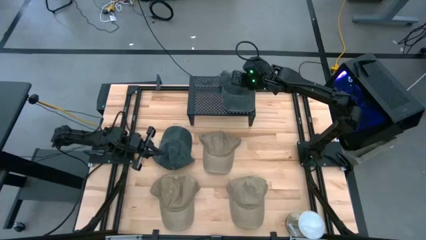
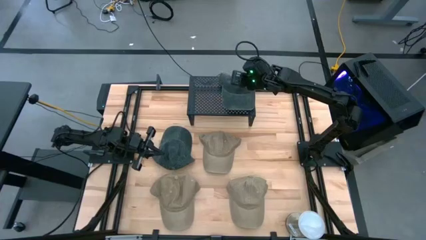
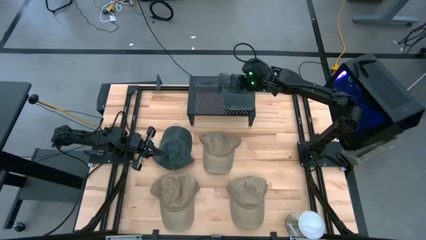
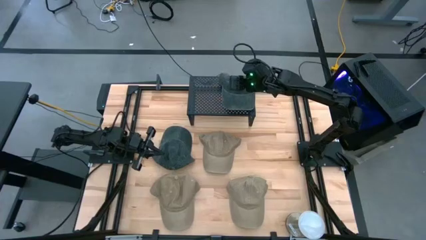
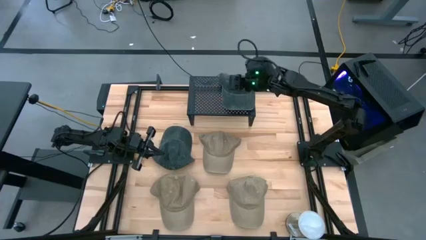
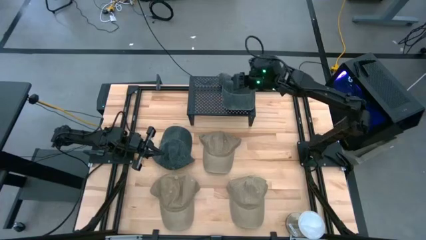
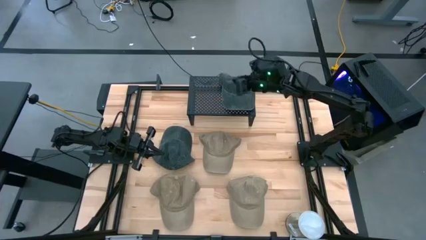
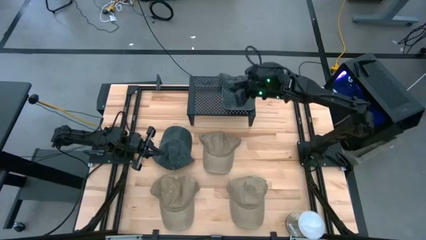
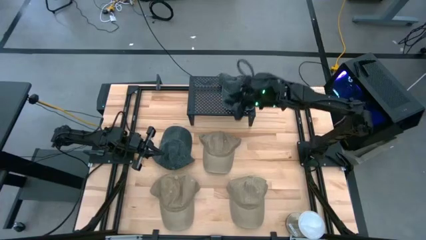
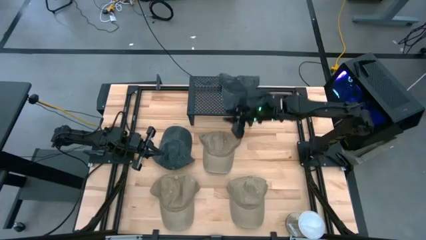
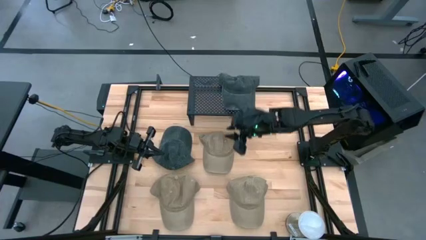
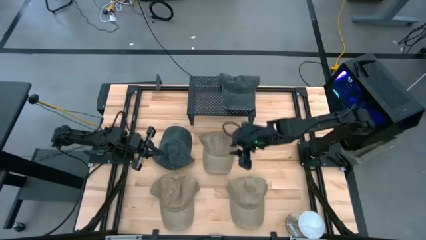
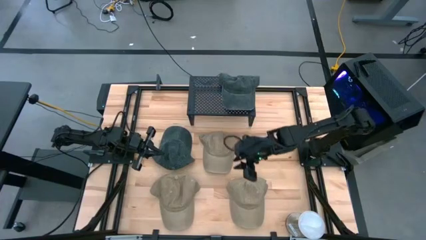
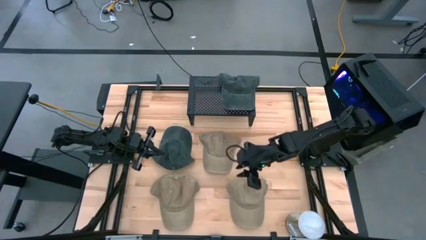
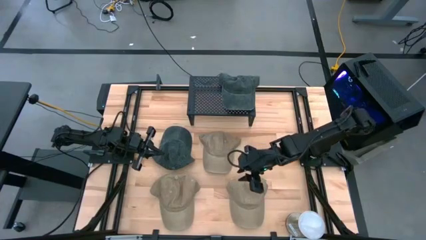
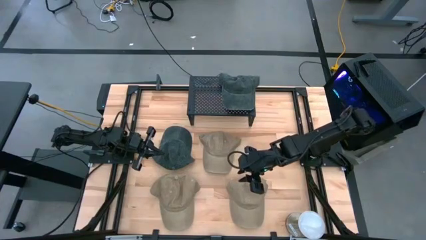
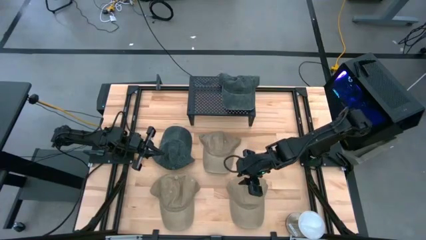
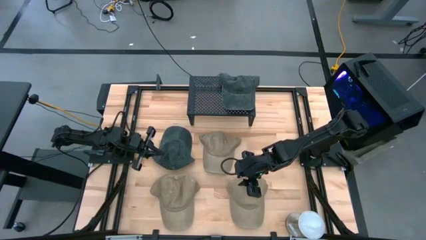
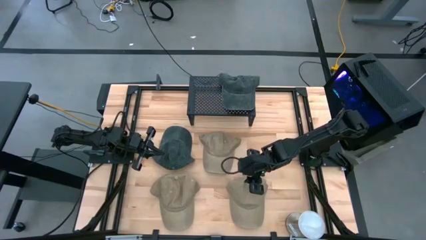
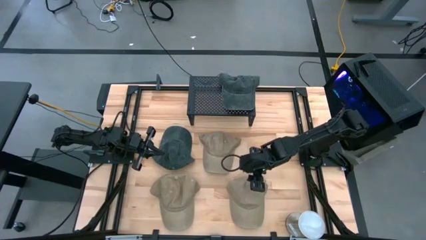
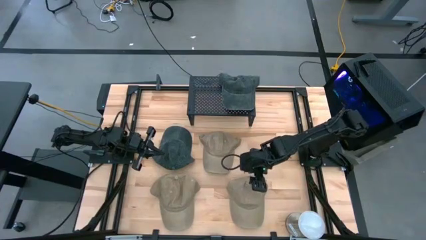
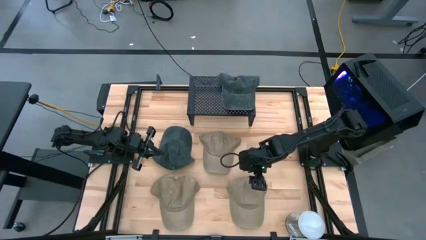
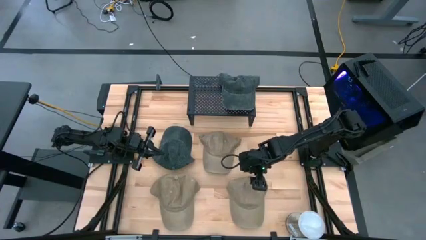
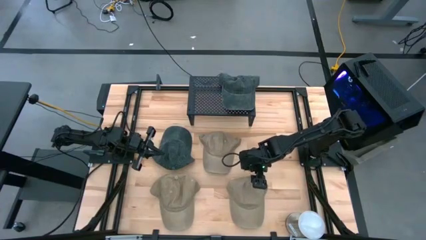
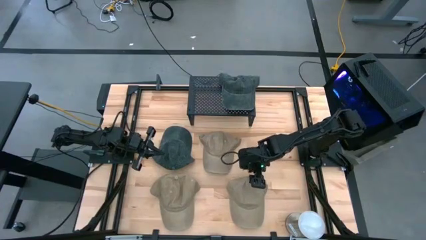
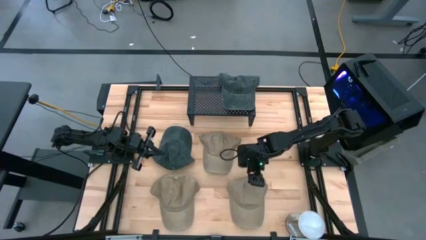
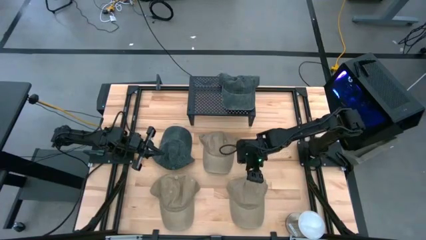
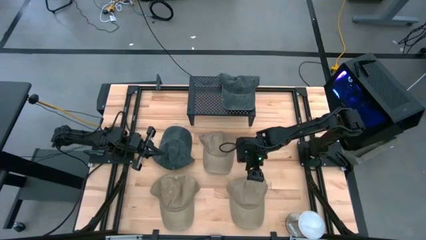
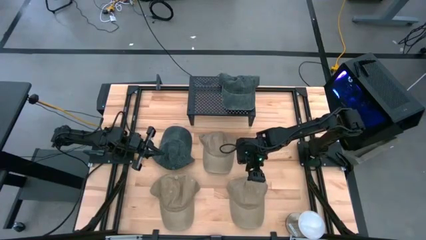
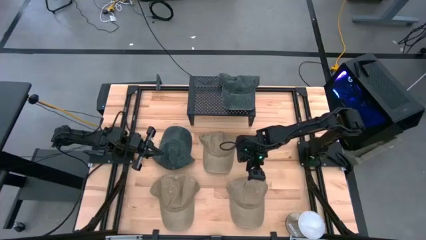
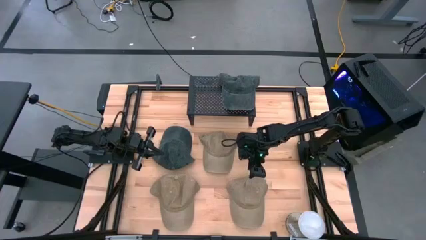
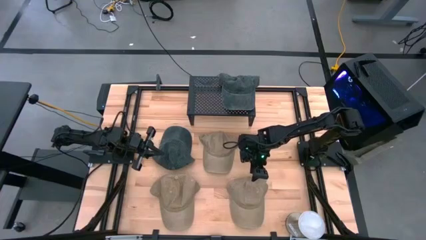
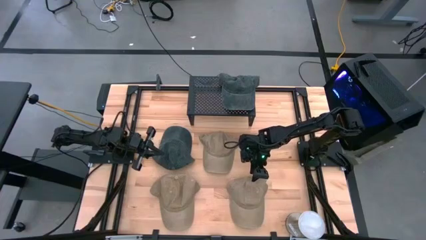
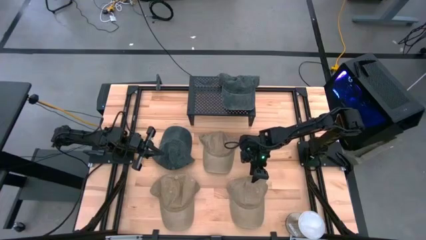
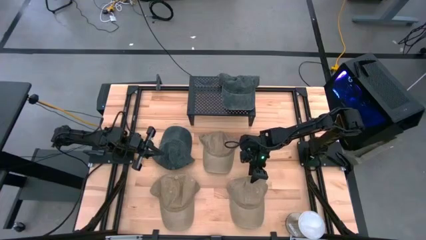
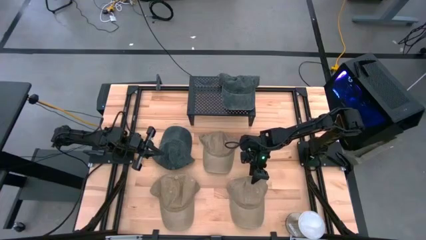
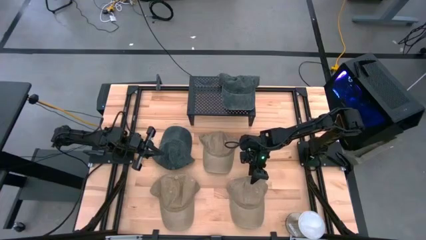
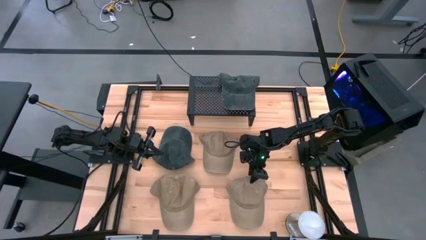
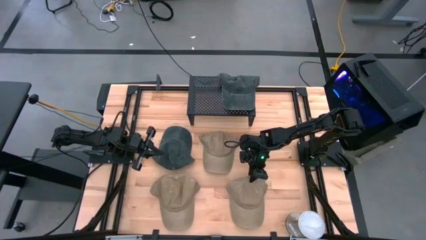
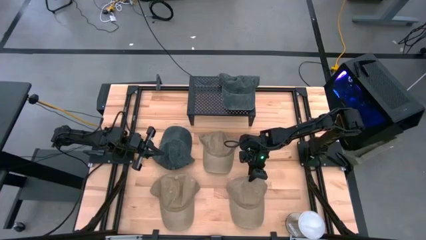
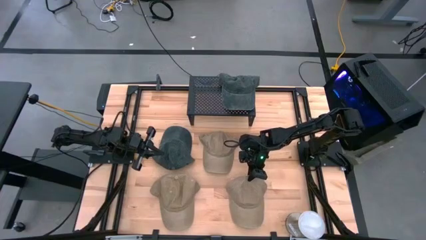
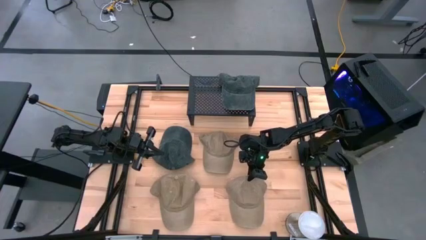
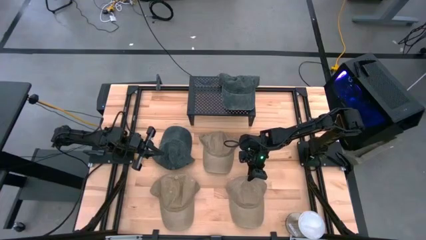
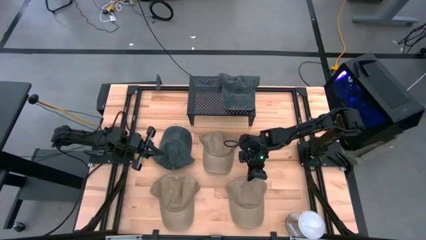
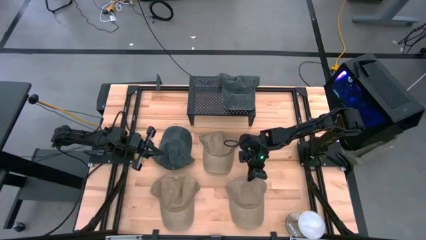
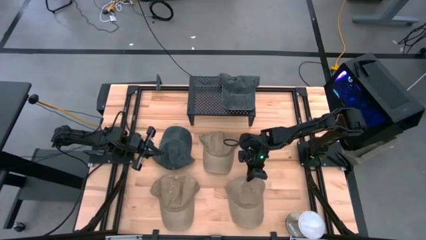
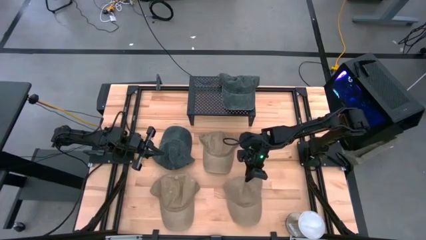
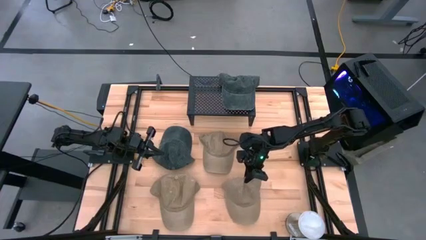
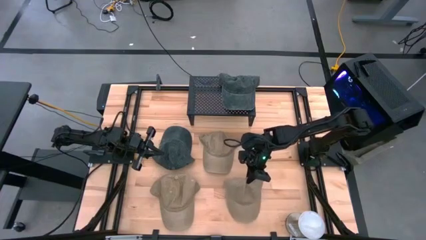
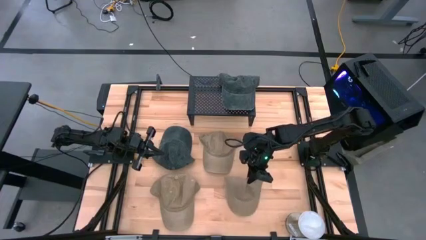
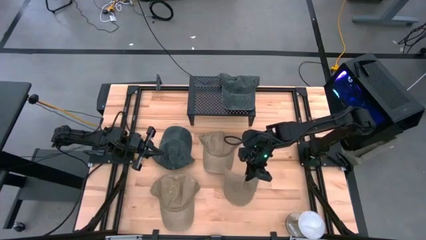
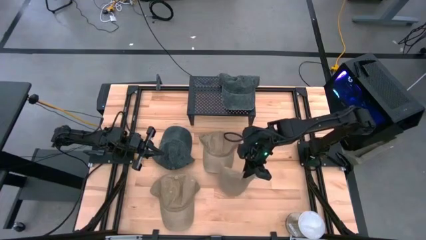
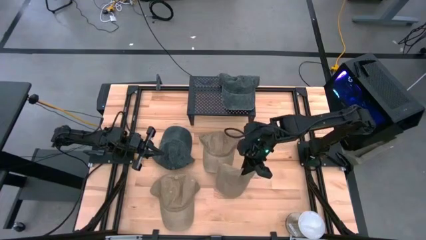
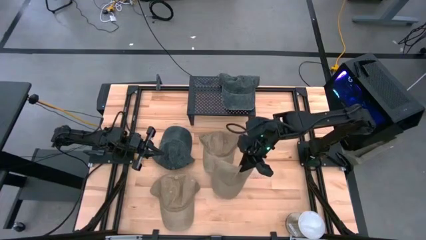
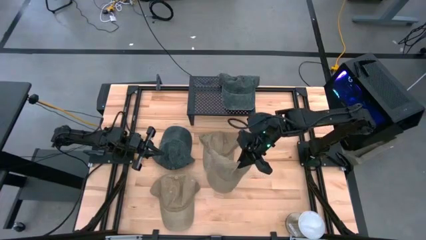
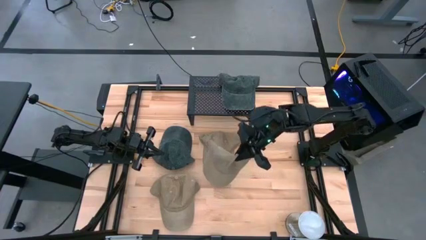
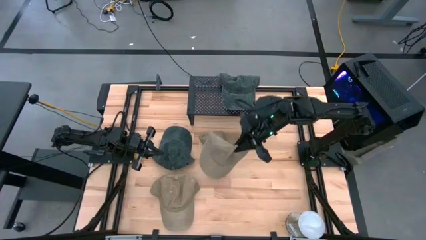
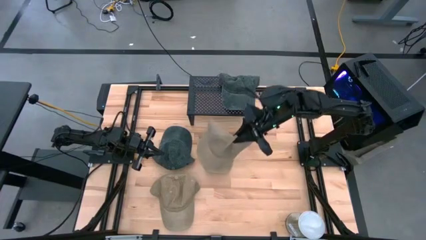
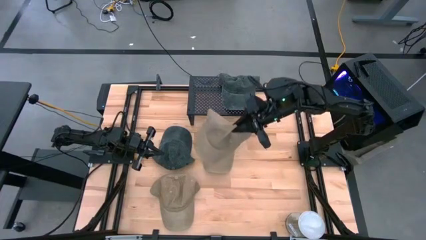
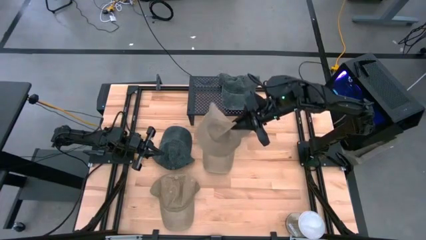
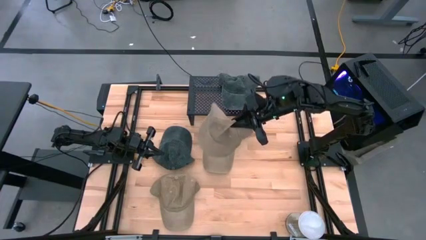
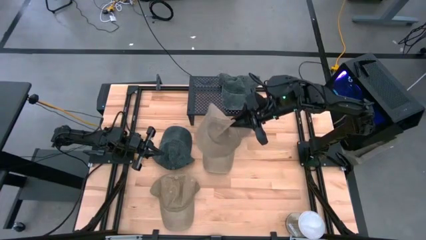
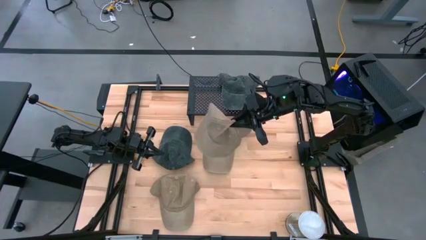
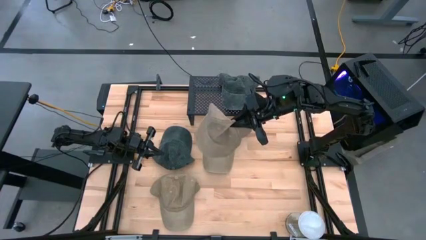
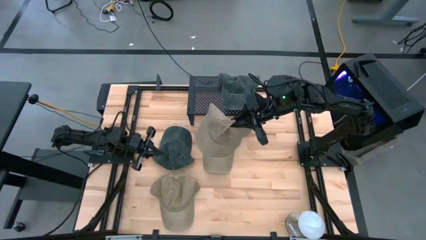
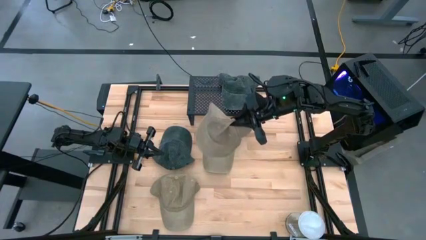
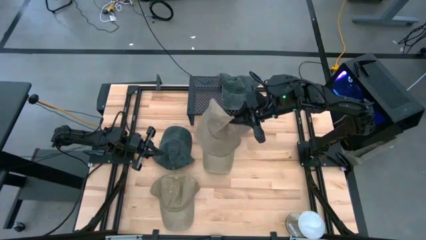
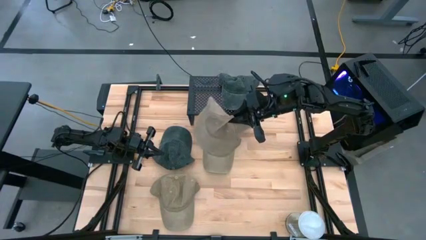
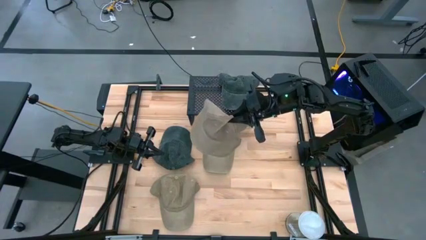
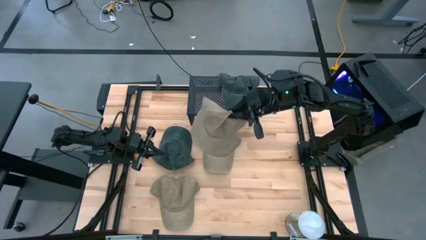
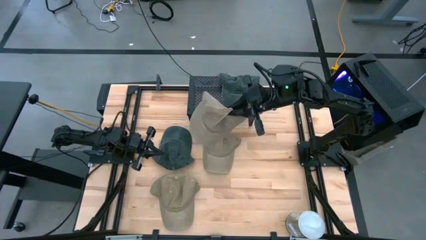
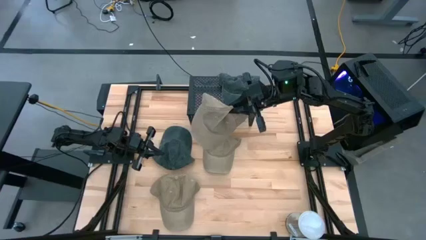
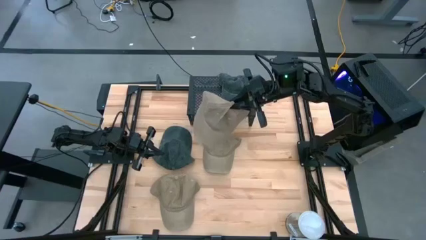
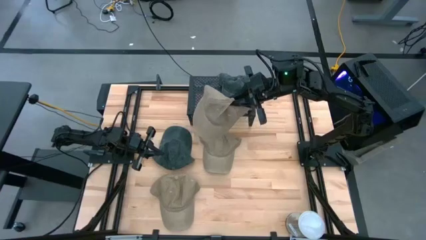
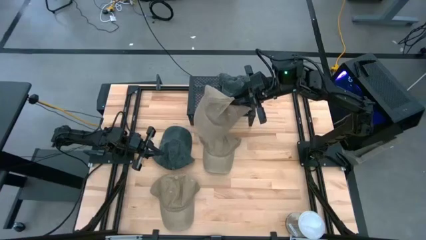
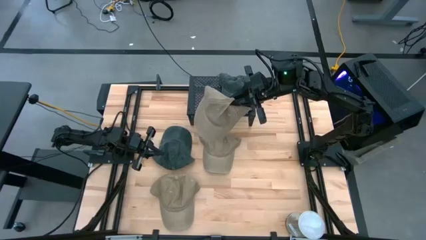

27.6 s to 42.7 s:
Task: Pick & Place hat
Put the bottom right brown cap on the shelf
